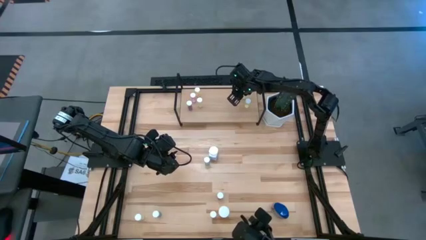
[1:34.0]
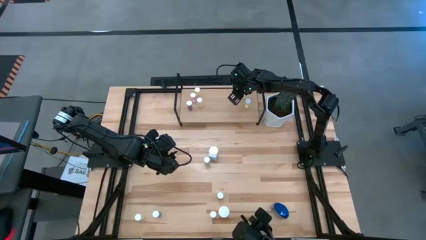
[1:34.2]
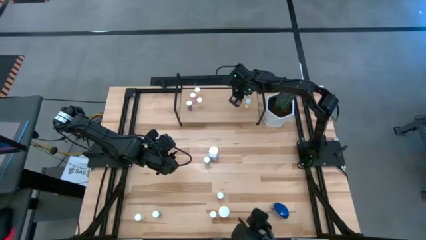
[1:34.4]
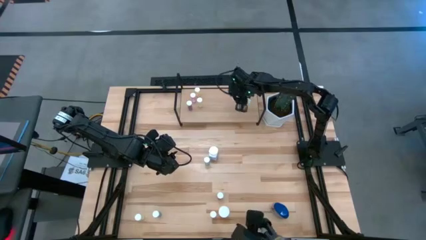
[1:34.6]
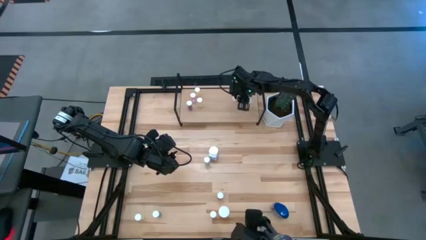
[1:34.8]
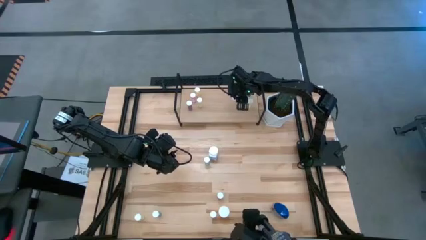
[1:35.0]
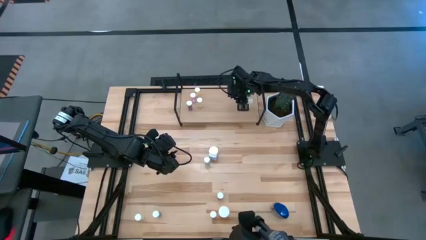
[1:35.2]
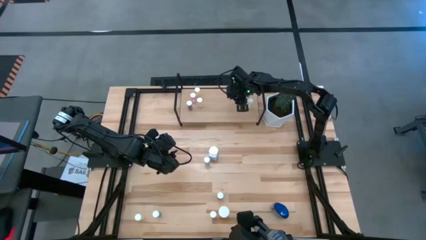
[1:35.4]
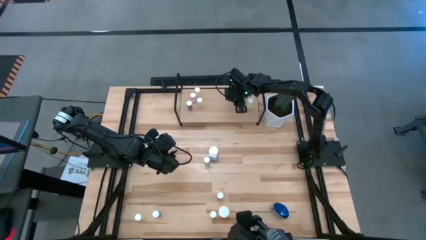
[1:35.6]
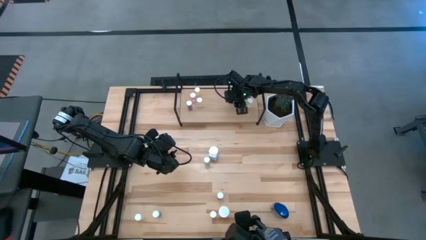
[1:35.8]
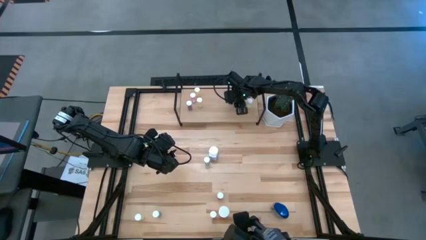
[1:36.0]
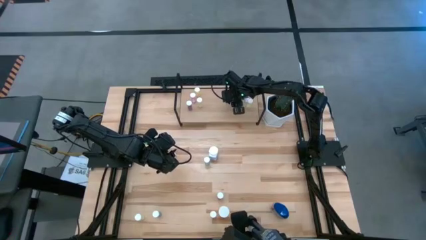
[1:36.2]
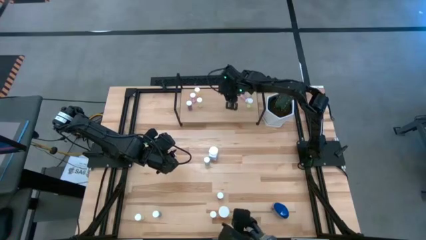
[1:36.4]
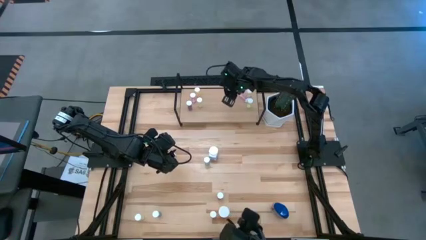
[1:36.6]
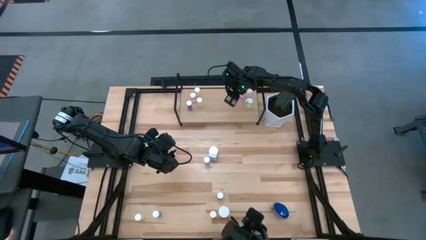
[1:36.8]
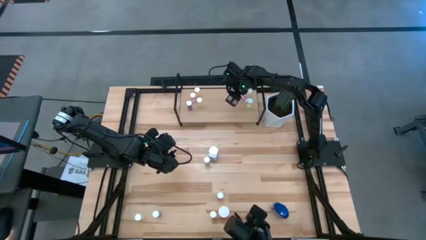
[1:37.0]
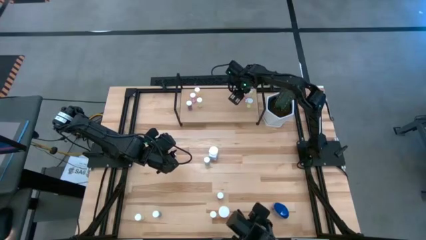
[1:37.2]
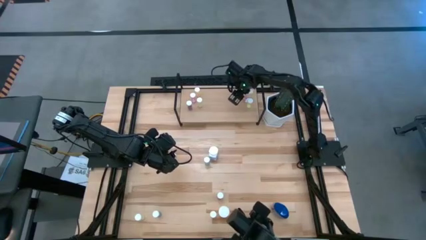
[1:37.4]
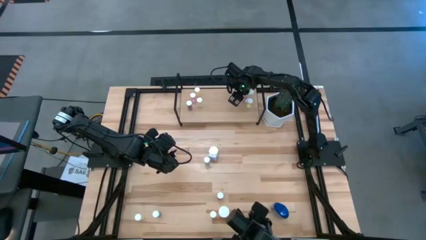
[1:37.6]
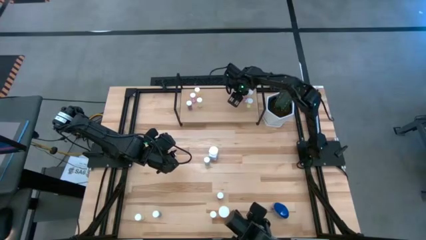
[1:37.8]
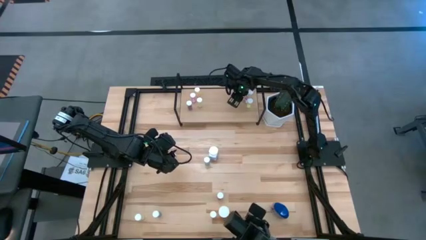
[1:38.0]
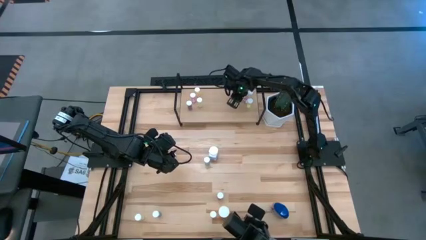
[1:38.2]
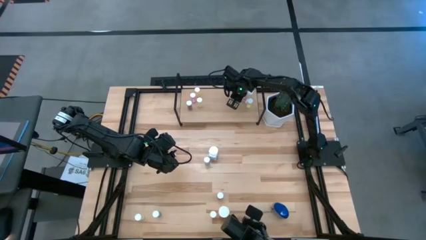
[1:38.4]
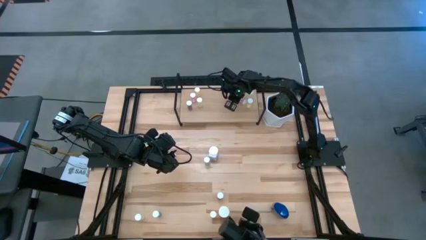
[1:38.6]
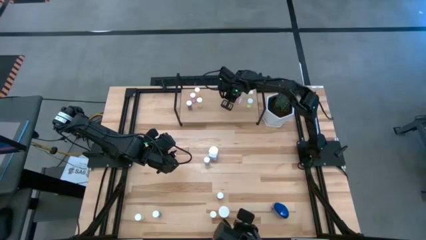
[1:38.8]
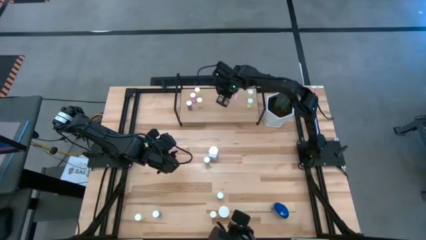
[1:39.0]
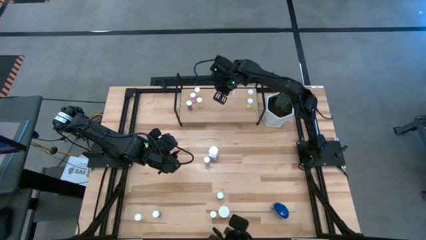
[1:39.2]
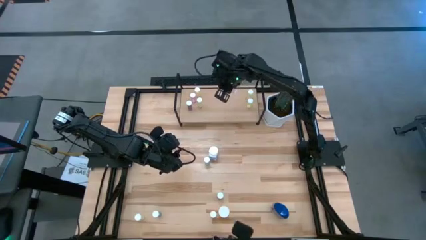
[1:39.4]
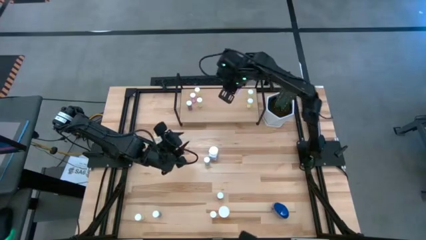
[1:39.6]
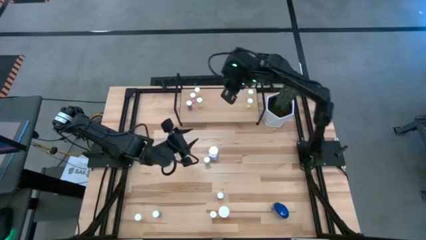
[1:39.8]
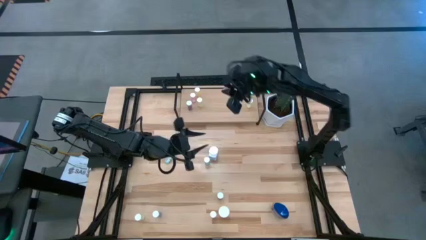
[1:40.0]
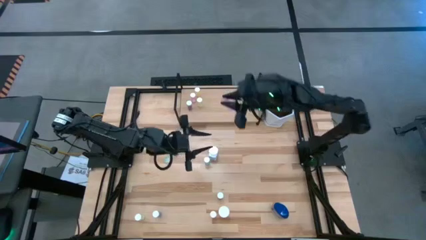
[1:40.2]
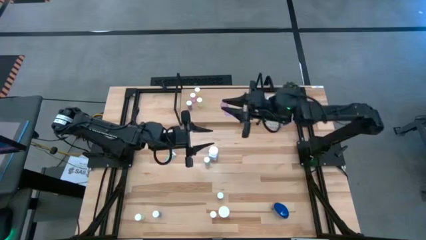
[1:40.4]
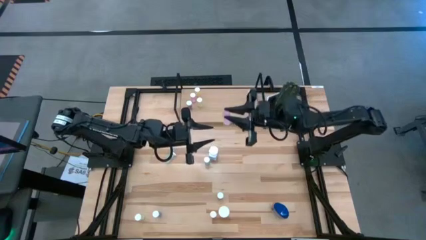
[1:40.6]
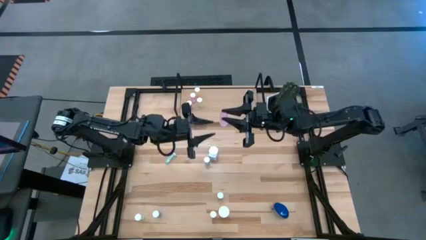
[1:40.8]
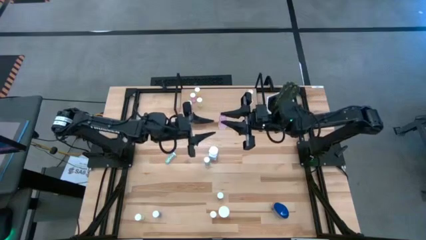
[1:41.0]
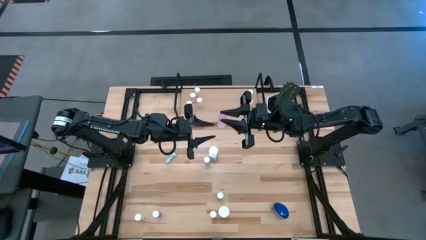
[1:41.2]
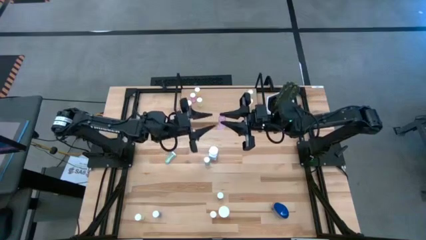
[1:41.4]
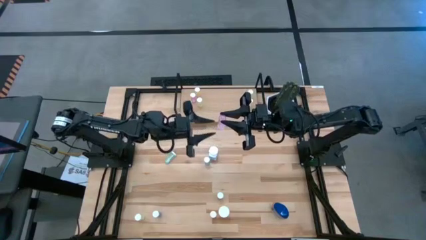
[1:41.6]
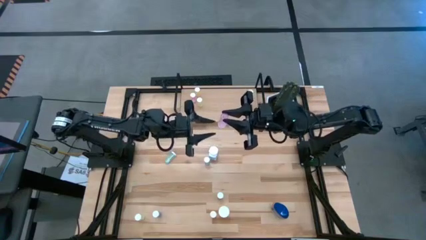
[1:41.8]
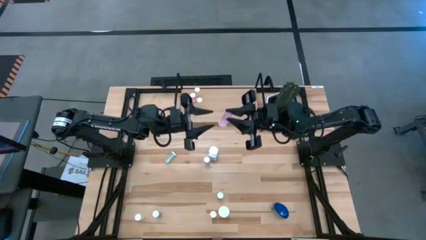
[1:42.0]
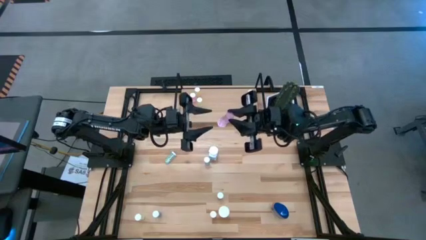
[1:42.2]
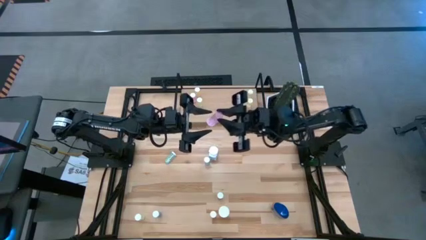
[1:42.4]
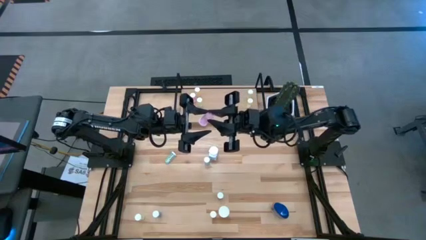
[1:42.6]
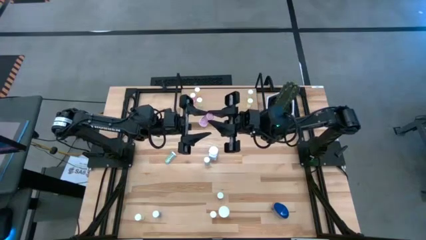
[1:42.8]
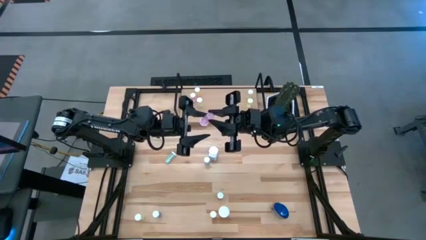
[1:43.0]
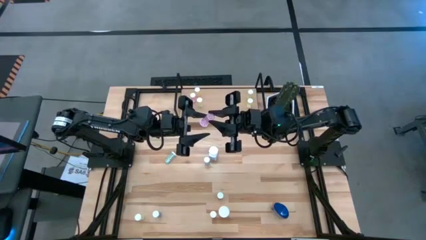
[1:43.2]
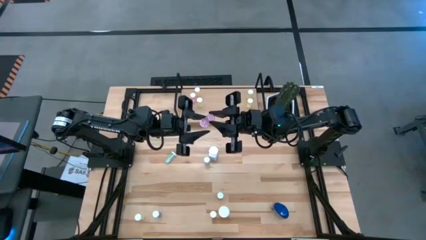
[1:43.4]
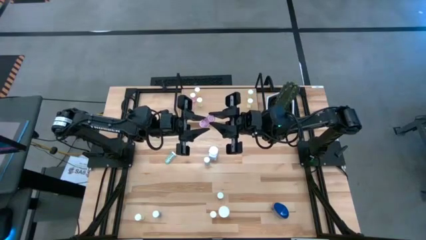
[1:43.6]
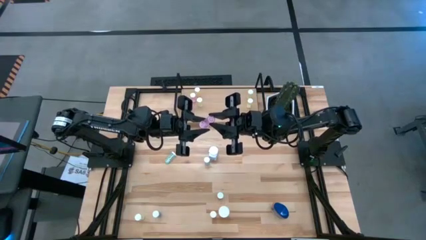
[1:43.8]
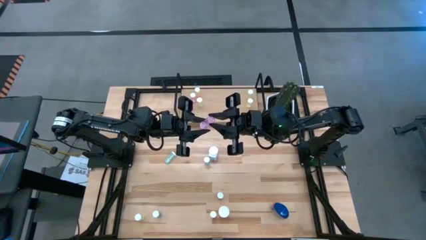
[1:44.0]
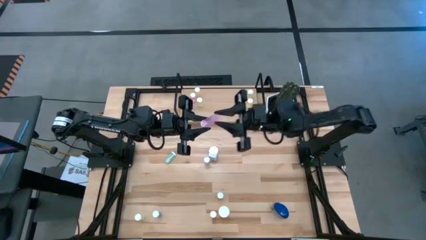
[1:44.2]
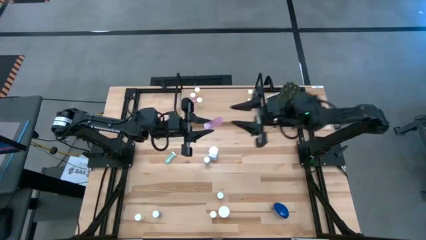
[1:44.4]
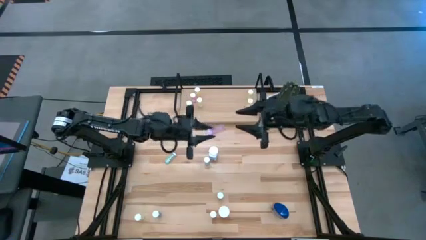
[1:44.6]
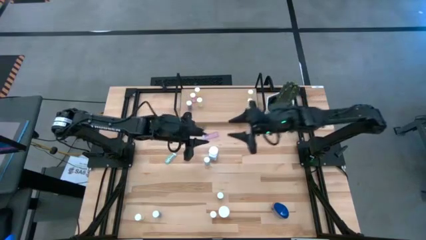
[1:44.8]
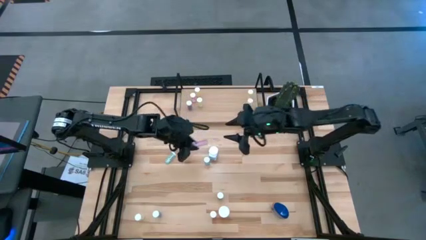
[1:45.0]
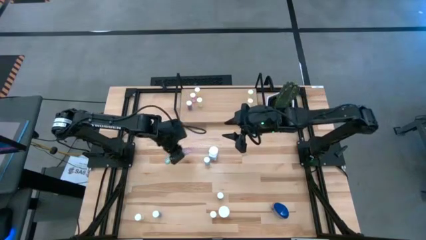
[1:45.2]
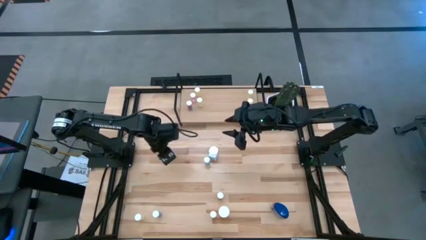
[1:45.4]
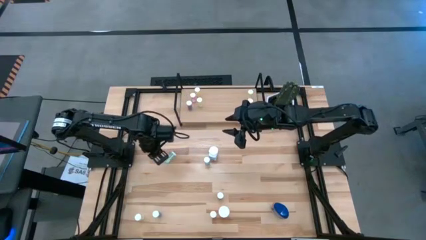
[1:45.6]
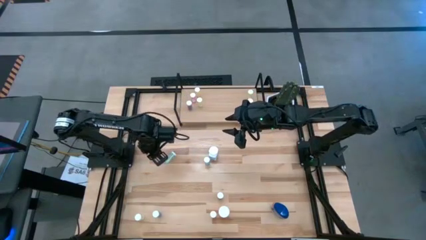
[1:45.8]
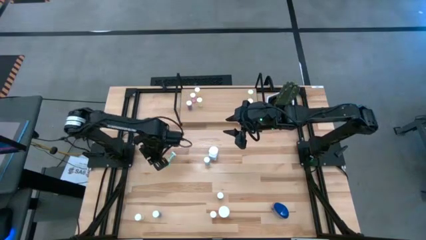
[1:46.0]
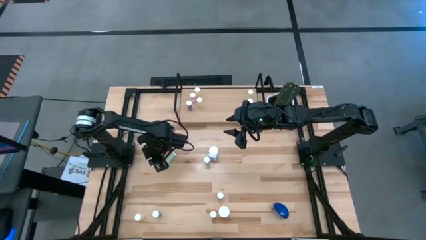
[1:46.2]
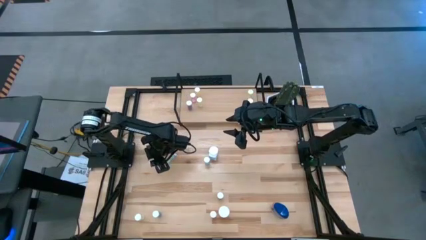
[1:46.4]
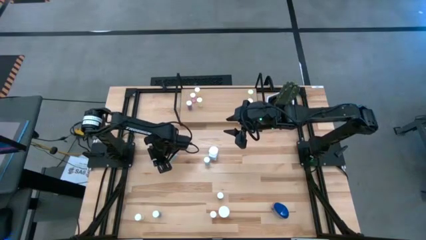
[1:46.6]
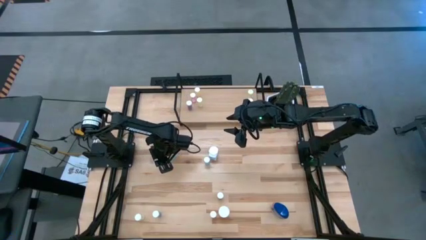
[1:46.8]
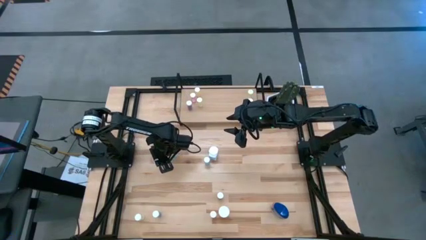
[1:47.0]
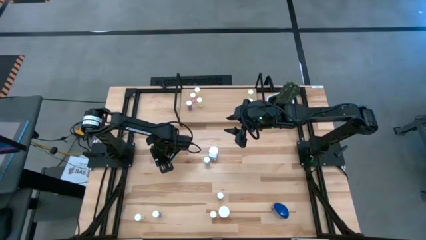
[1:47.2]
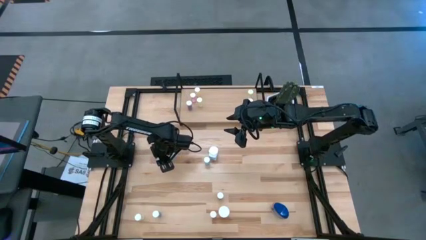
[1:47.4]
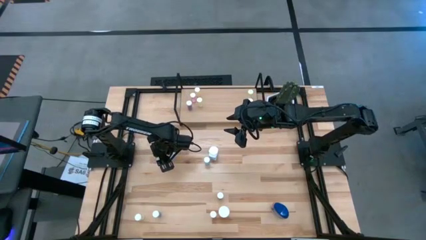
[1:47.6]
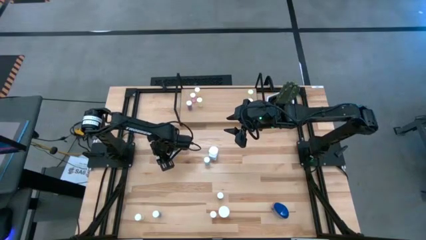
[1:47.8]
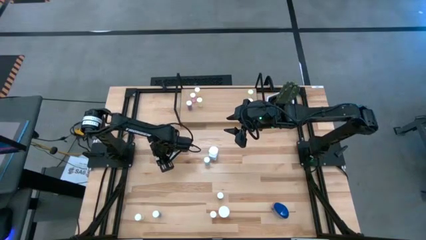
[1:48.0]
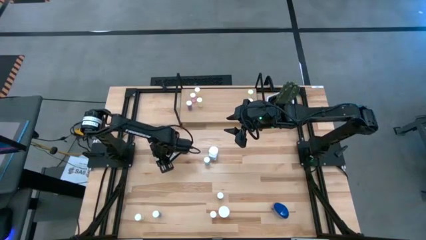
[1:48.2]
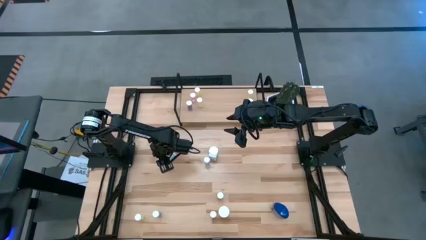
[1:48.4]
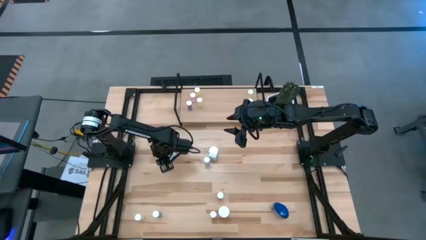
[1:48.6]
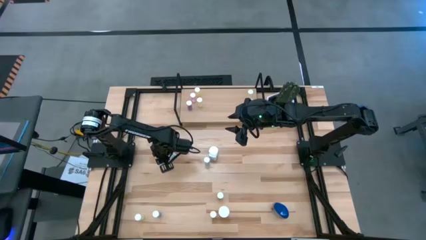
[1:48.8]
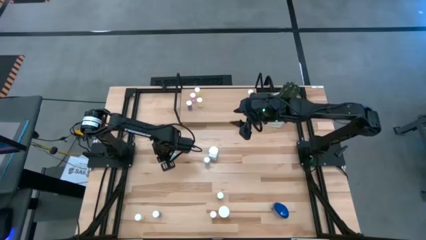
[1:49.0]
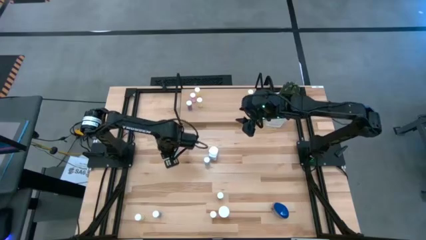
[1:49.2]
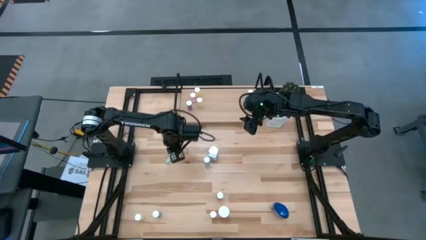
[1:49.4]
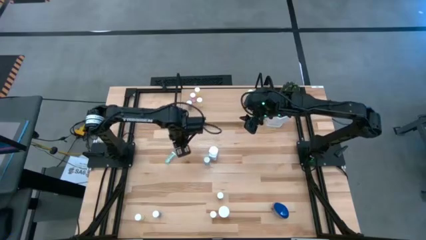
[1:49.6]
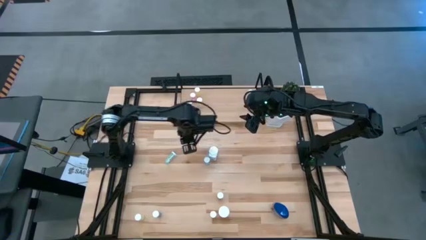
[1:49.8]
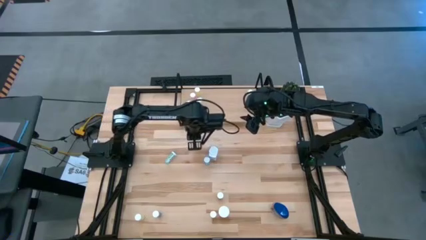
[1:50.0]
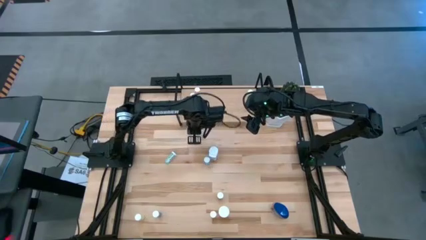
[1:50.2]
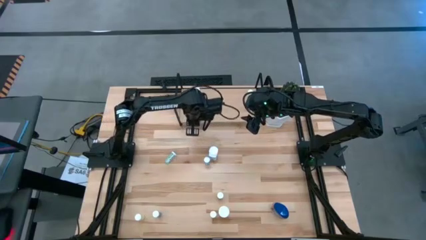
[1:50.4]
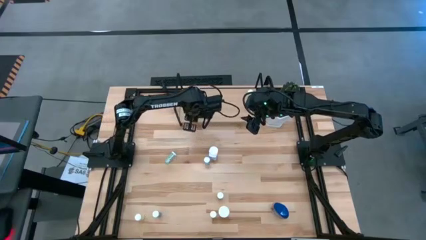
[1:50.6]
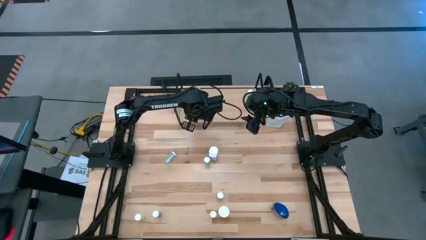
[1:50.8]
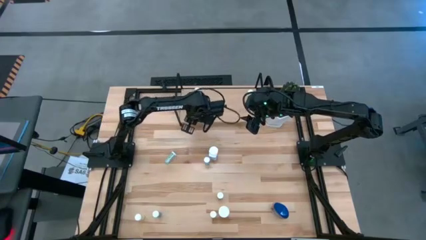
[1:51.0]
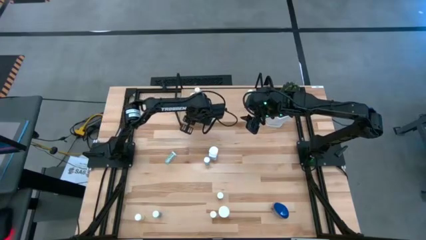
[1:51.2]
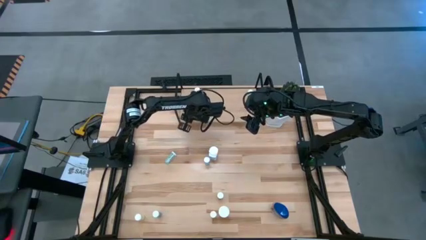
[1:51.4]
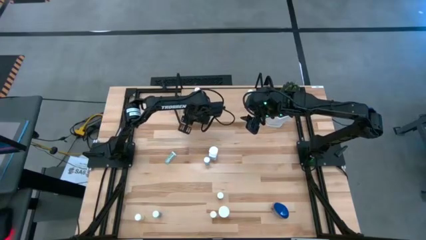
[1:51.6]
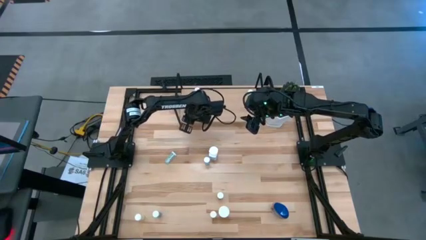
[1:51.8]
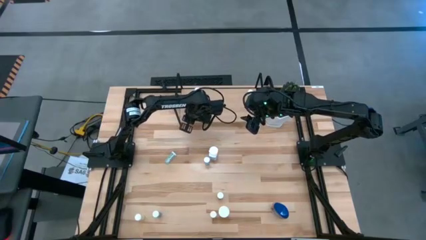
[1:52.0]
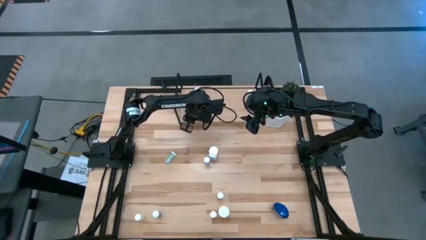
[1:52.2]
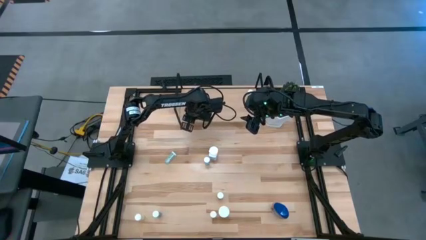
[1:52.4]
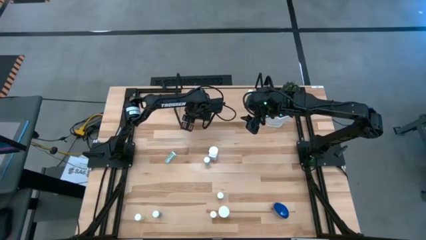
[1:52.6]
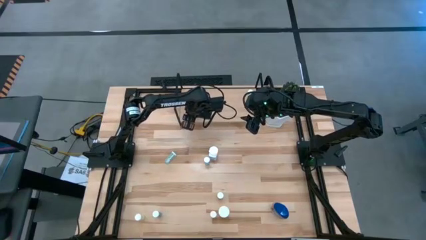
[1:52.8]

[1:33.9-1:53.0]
Task: Pick and place medicine bottles onto shelf by color
Put the pink pill bottle on the shelf
